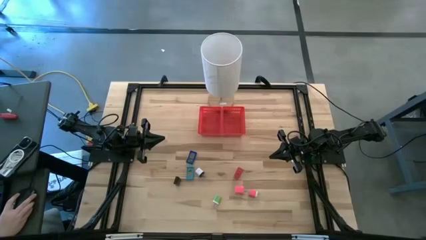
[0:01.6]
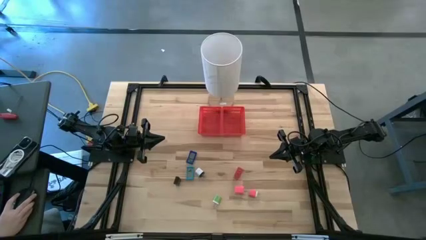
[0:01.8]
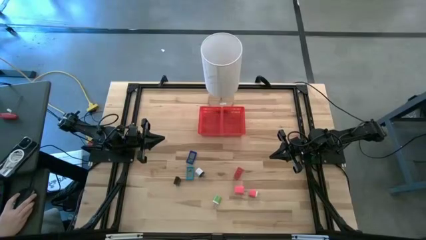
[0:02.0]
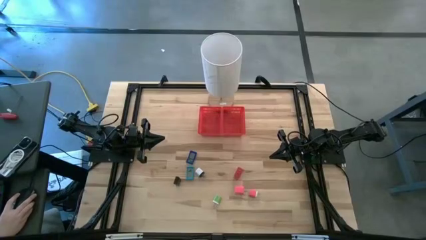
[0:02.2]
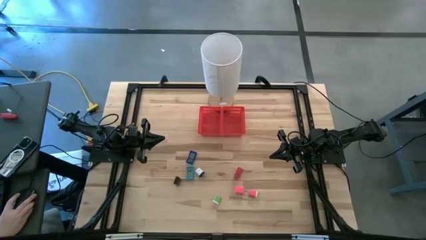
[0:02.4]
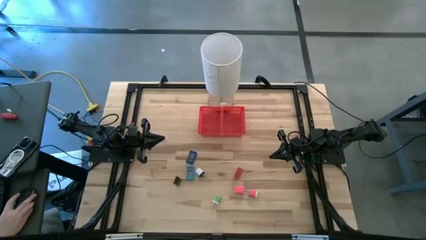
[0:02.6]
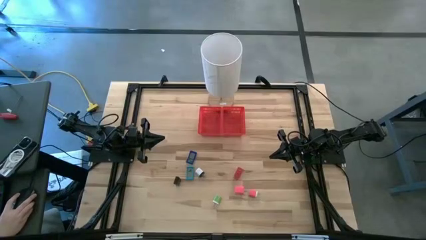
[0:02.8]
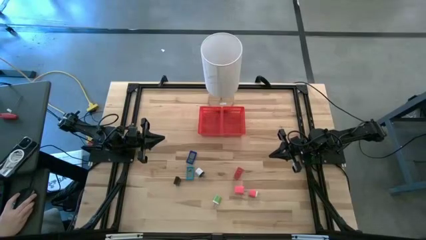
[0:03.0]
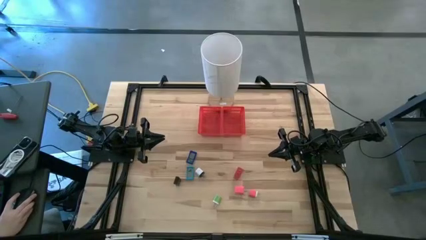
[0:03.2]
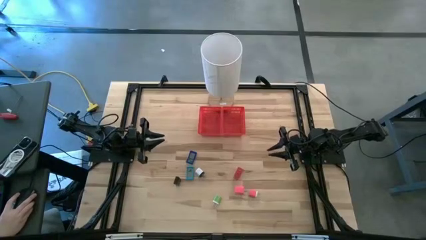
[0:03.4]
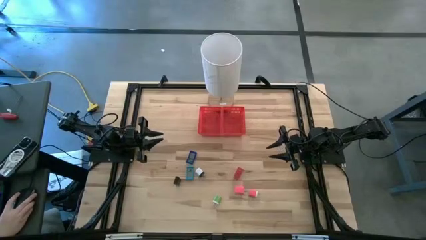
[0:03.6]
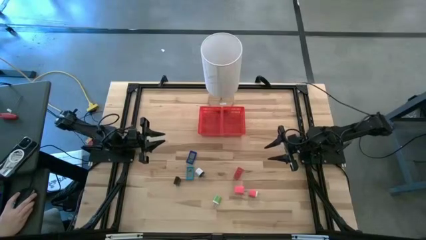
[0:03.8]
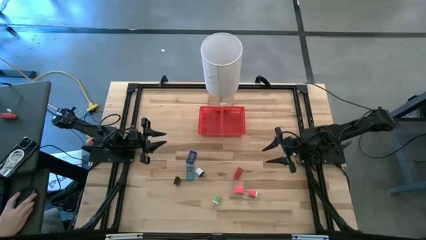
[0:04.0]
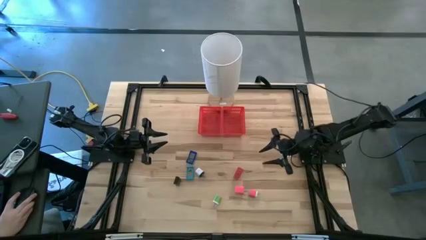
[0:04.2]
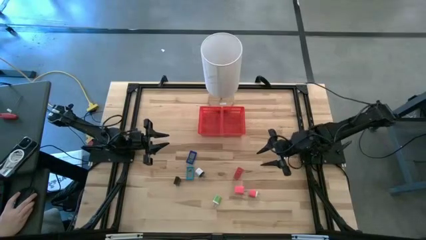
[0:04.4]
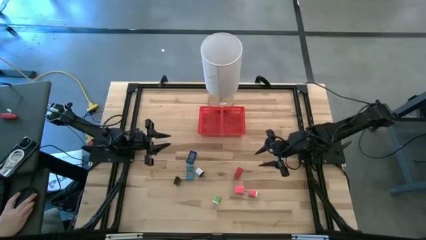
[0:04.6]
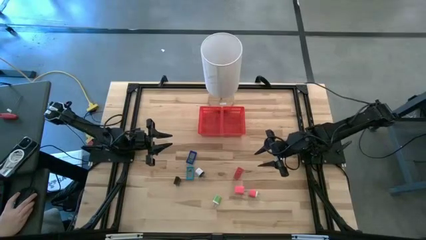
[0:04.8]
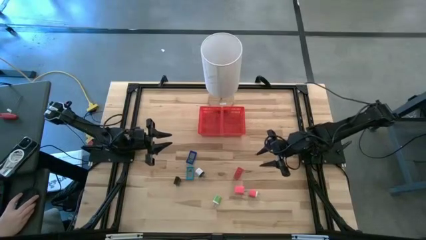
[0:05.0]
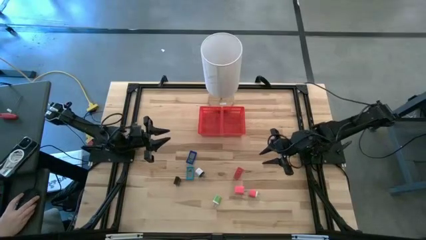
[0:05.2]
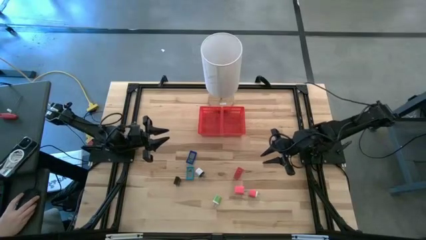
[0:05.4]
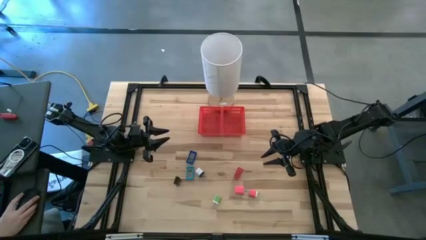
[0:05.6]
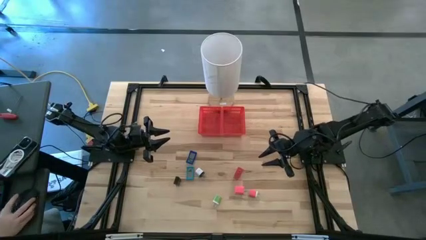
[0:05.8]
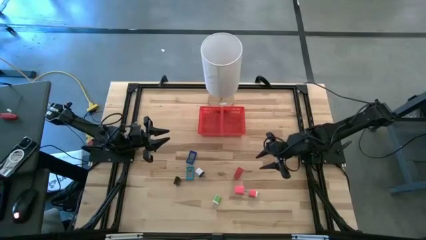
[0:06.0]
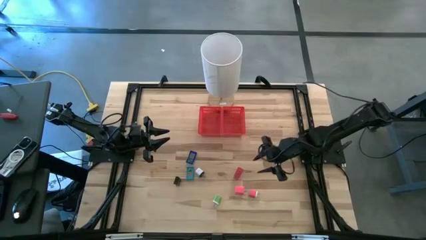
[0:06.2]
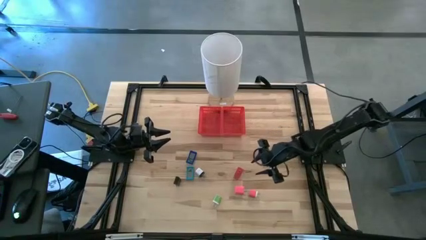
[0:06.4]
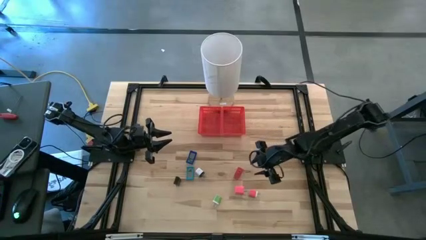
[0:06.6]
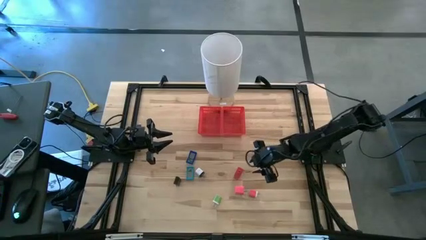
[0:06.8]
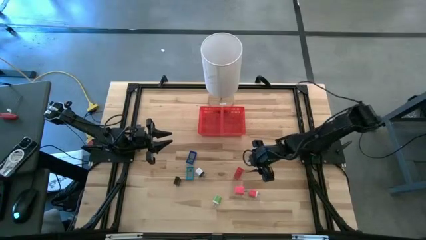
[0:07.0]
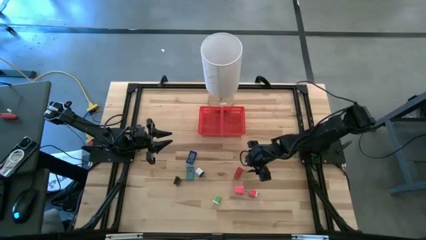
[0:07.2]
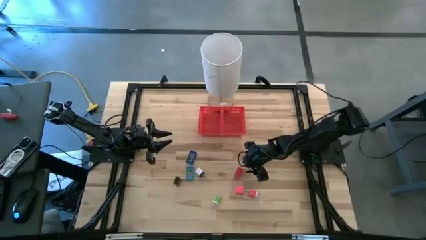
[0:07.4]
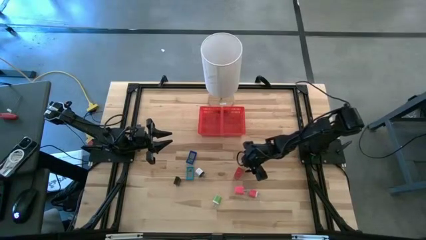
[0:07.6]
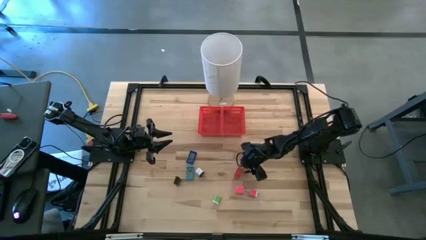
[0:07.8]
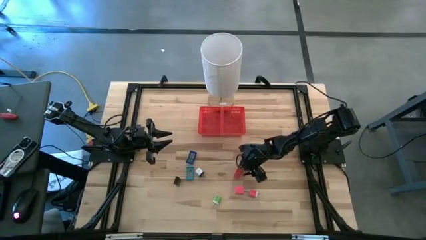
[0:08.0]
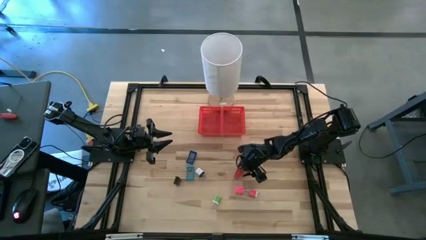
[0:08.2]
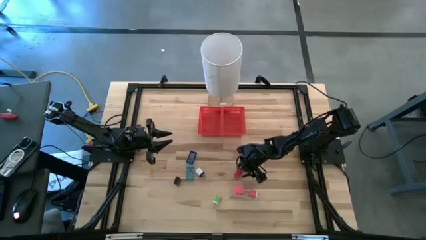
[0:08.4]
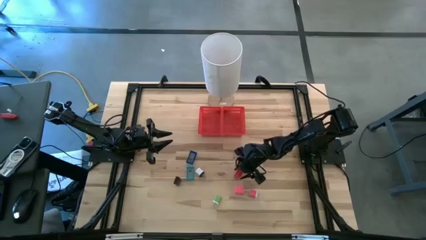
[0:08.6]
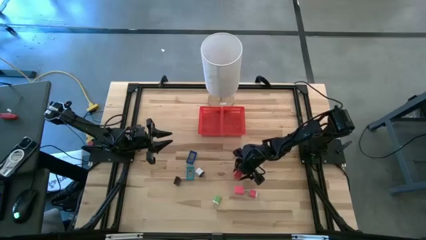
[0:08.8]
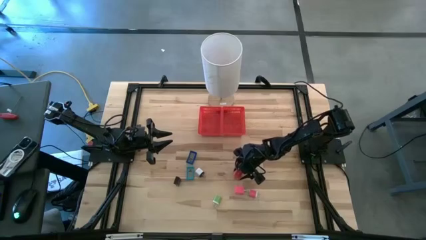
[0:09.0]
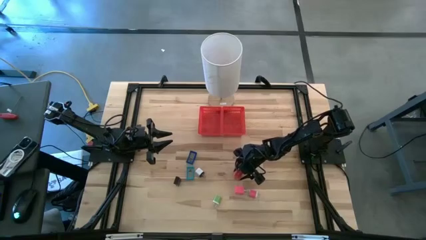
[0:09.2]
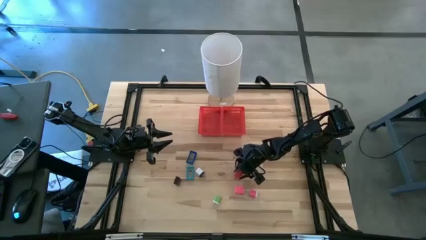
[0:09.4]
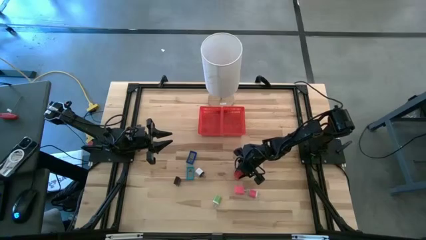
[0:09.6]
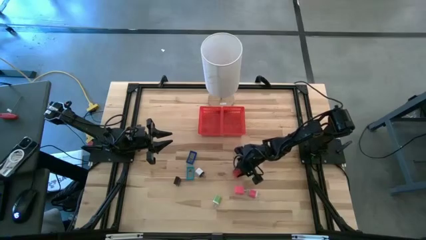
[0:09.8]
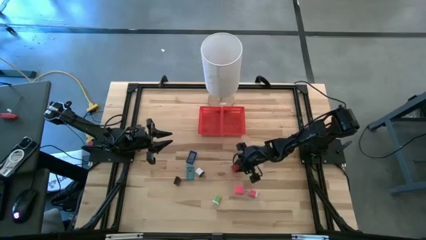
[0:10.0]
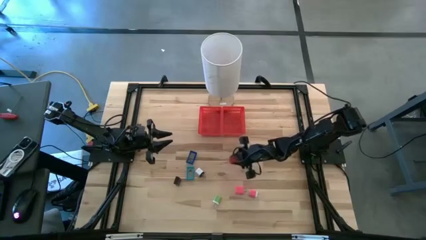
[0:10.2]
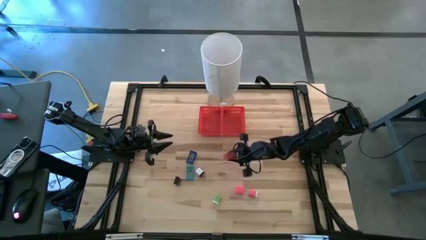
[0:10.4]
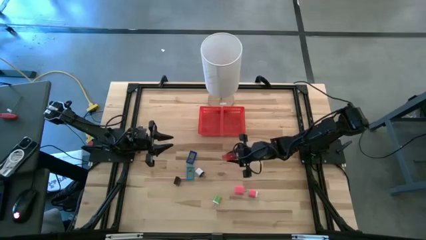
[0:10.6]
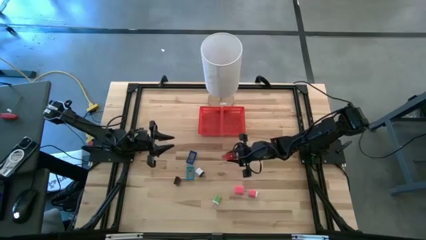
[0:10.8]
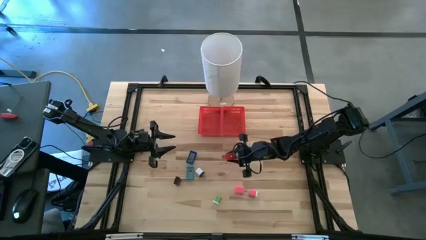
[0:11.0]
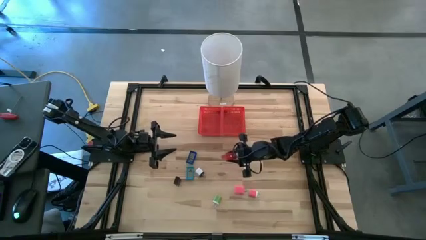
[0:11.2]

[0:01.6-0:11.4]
Task: Pick & Place Office items
Put the red charger adapter into the left red bin

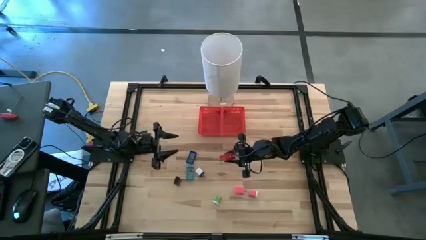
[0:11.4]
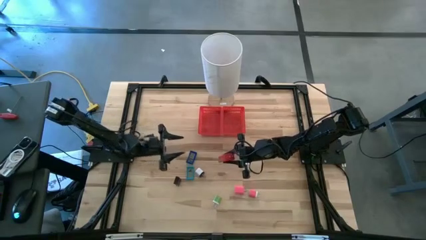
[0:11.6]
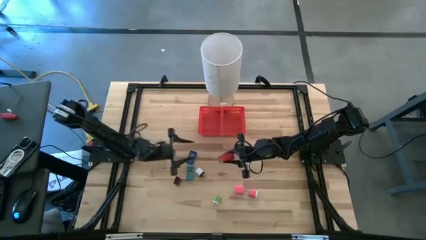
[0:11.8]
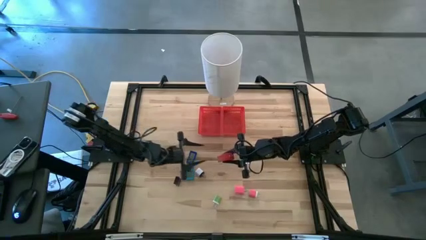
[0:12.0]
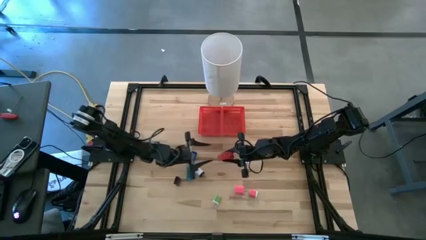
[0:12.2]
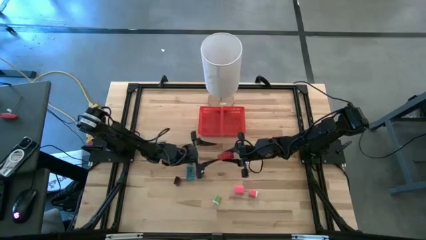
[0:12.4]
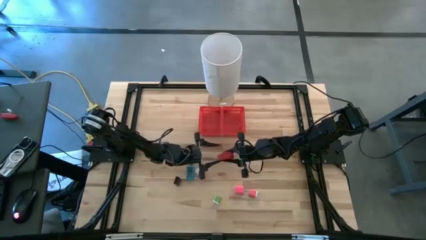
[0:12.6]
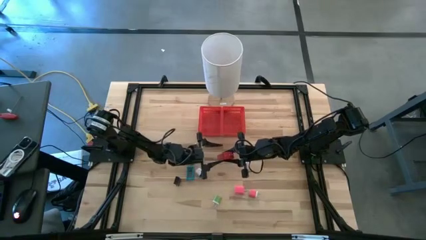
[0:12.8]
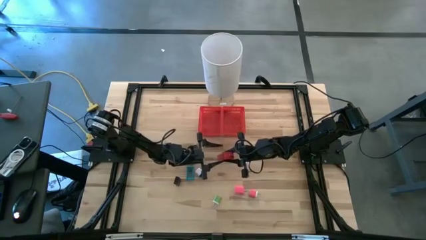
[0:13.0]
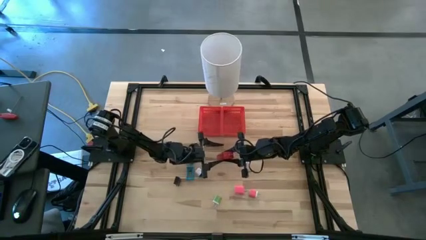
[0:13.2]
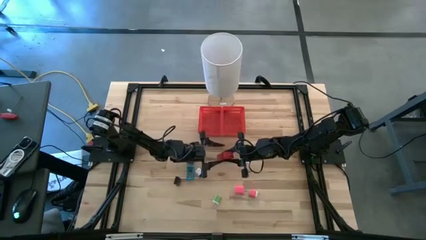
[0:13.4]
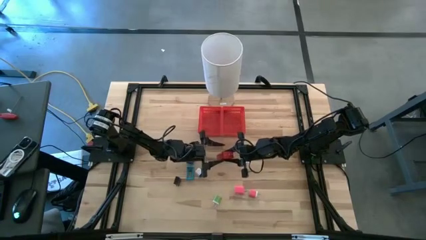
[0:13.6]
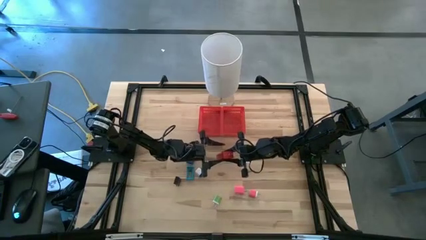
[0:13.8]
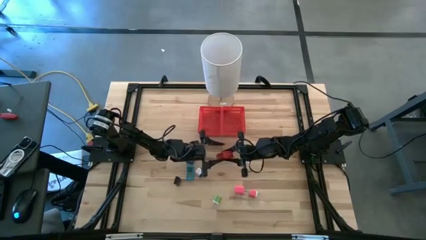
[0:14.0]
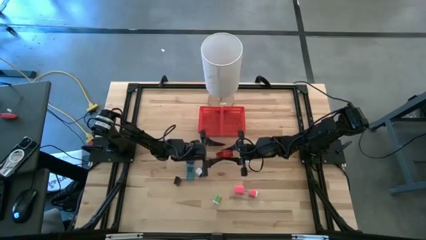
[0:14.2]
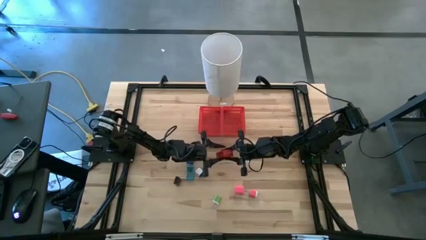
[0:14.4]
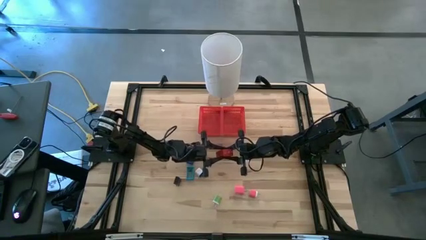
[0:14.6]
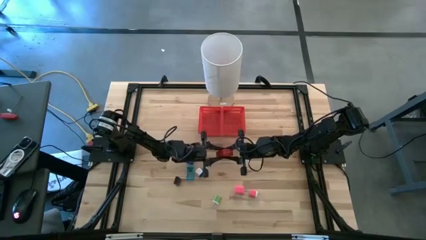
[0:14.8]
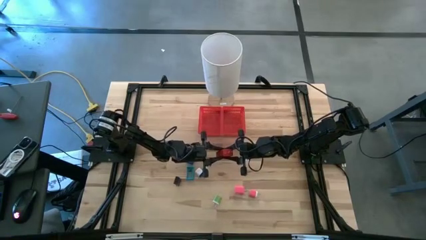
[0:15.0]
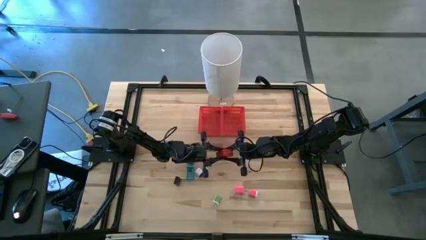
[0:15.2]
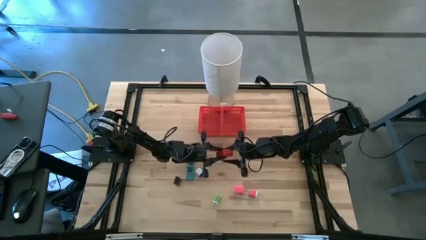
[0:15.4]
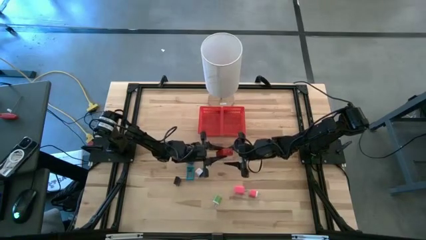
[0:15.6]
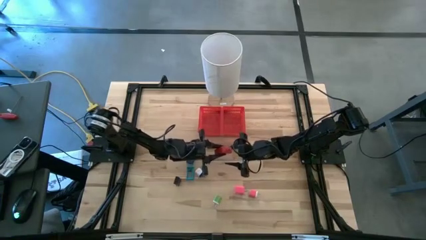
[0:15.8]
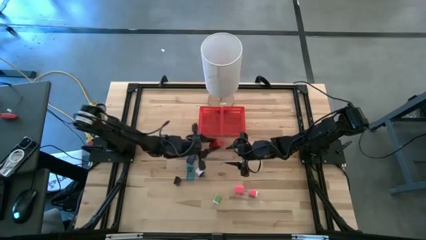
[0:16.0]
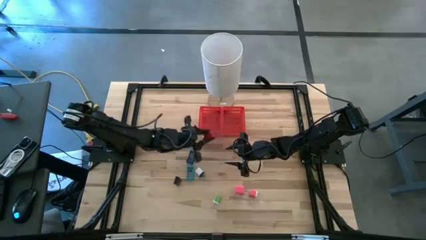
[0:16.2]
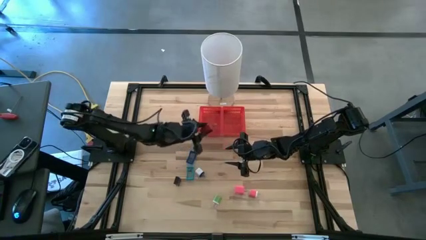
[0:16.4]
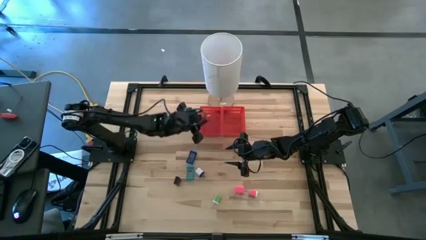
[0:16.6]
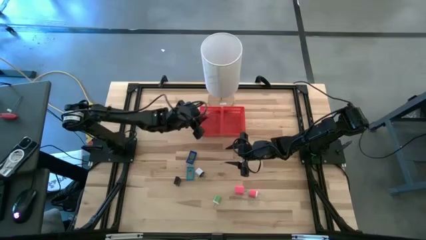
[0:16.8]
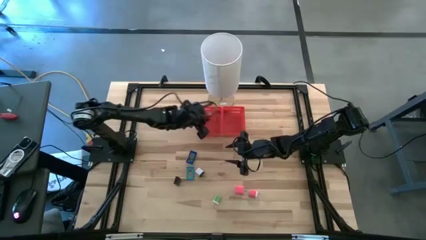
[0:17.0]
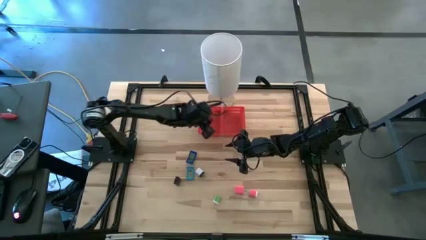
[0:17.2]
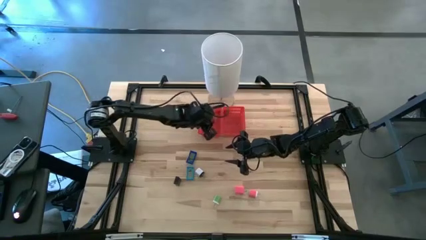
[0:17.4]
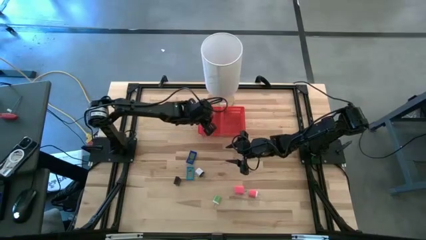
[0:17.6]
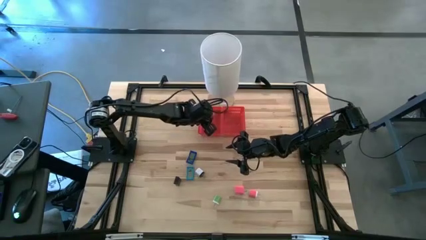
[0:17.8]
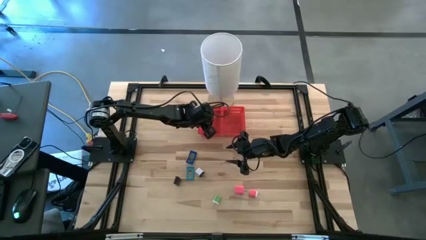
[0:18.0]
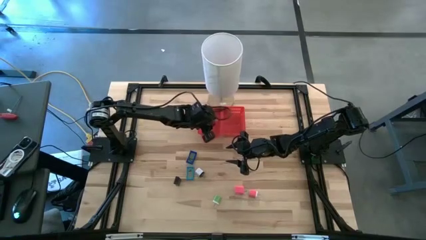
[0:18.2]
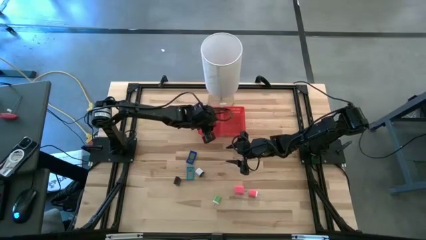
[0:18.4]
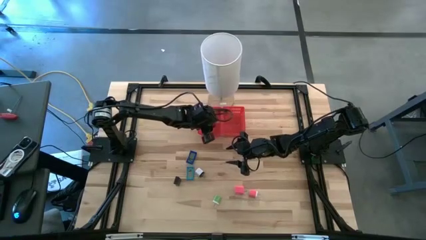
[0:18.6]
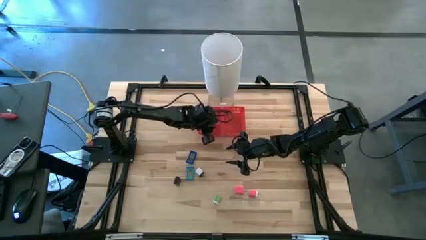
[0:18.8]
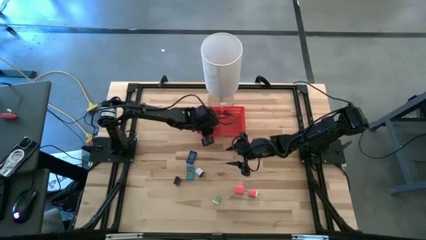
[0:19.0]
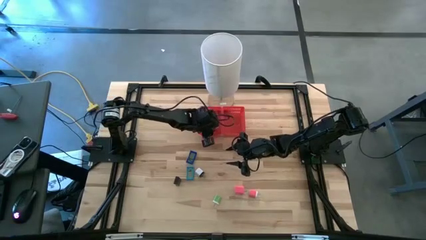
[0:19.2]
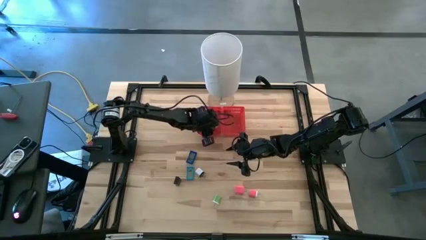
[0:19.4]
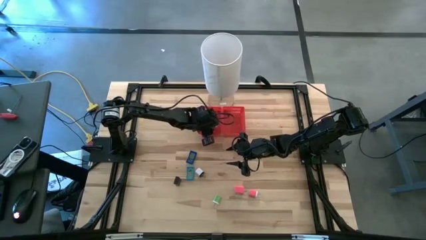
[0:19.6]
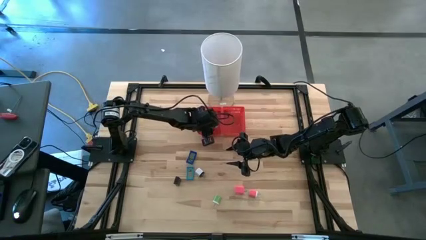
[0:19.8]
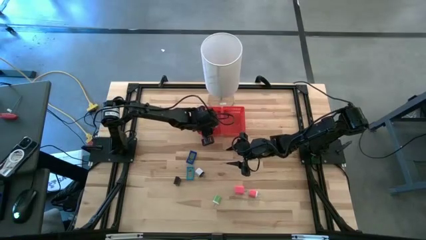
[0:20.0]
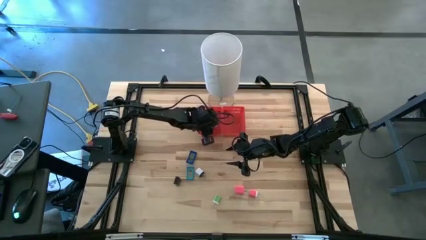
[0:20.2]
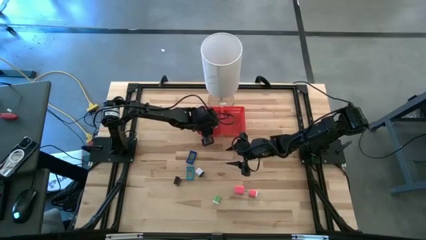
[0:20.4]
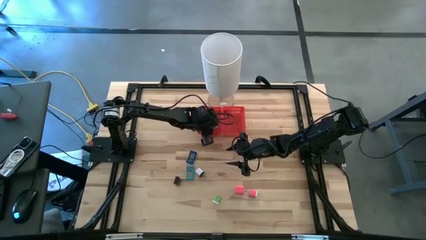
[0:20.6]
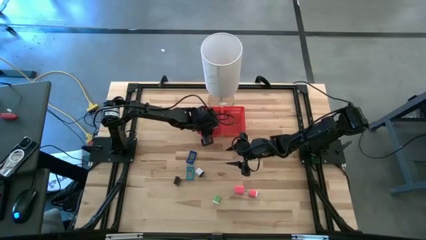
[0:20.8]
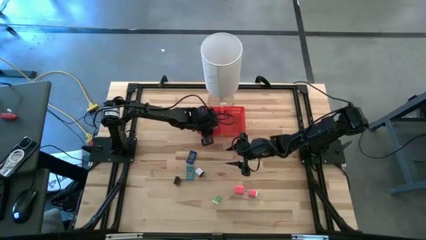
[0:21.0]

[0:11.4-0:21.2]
Put the red charger adapter into the left red bin
